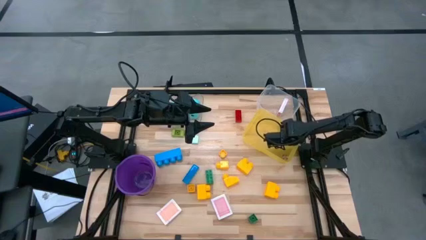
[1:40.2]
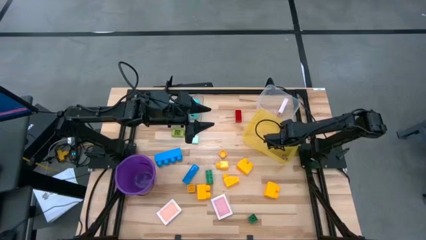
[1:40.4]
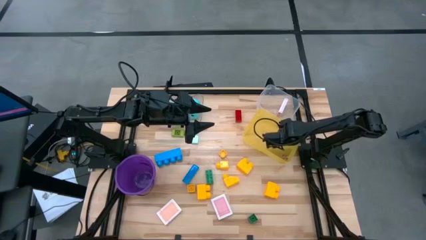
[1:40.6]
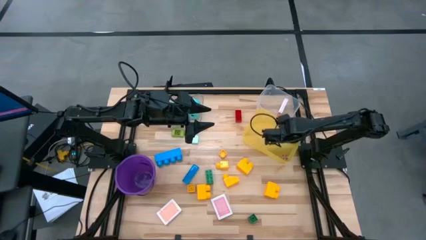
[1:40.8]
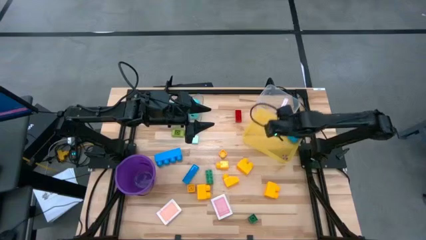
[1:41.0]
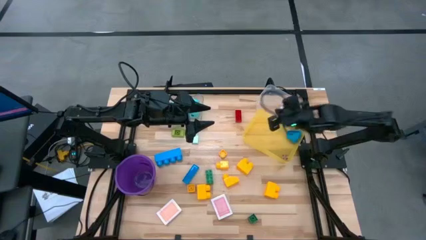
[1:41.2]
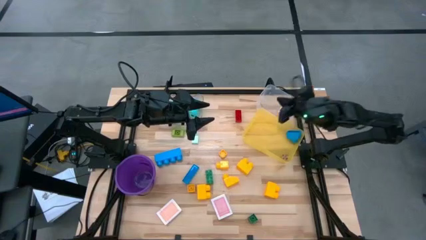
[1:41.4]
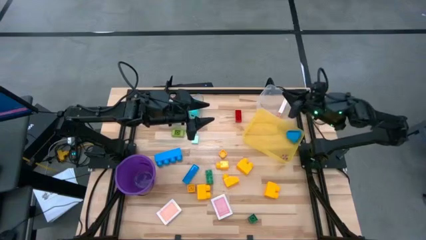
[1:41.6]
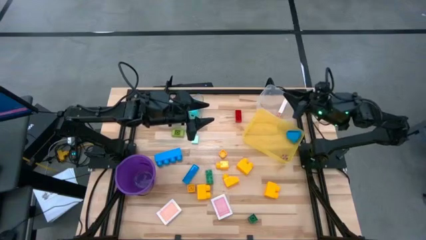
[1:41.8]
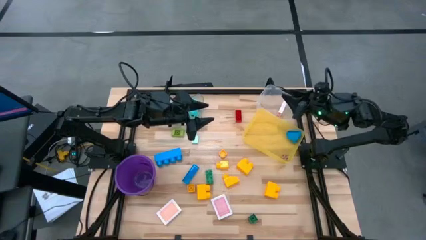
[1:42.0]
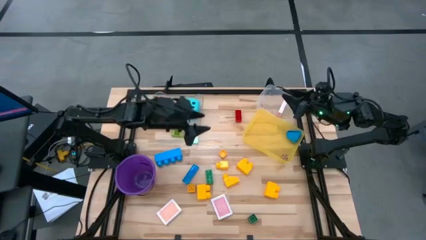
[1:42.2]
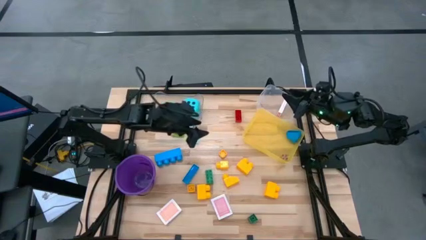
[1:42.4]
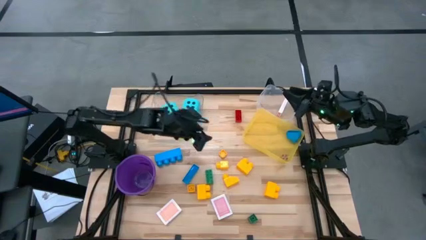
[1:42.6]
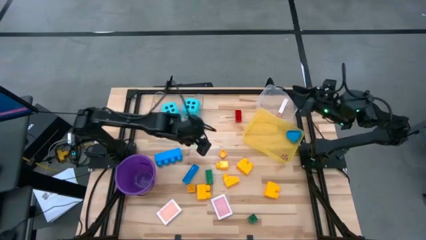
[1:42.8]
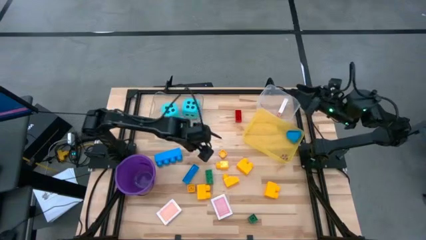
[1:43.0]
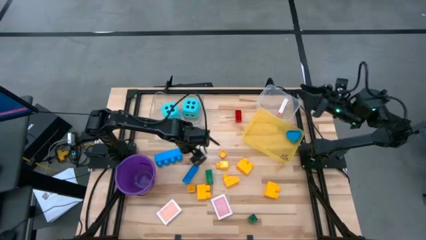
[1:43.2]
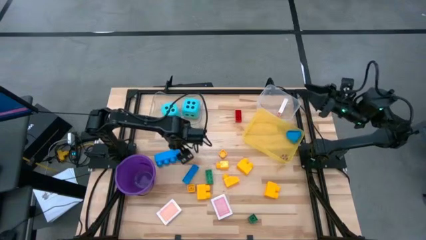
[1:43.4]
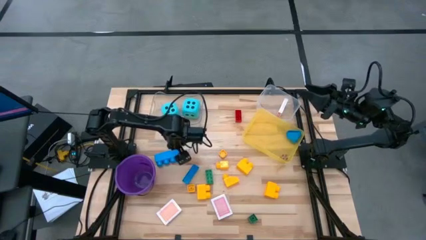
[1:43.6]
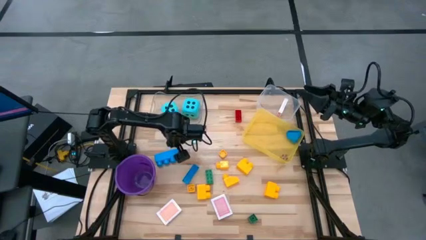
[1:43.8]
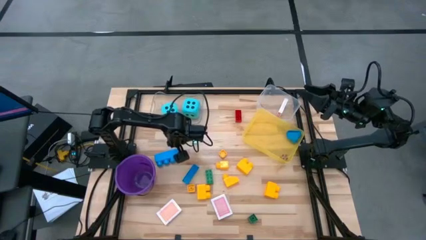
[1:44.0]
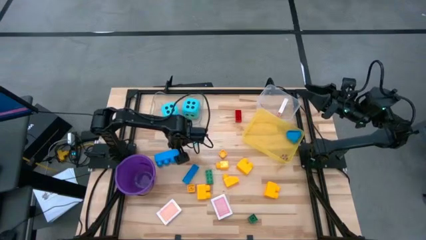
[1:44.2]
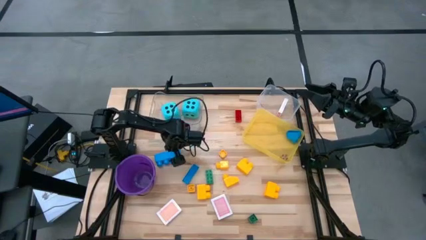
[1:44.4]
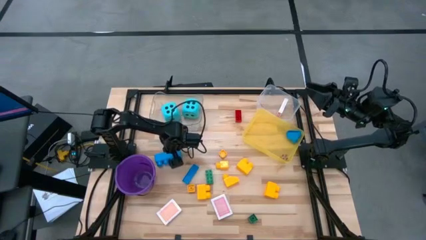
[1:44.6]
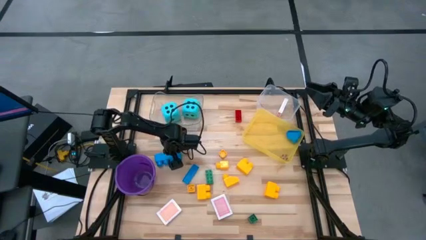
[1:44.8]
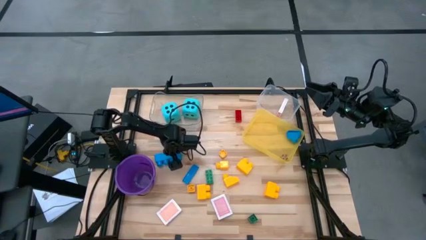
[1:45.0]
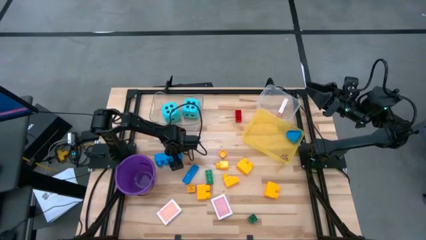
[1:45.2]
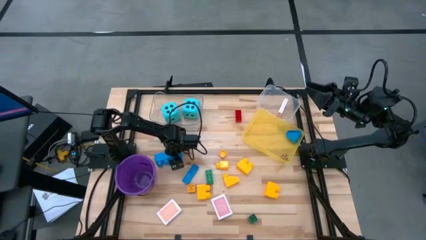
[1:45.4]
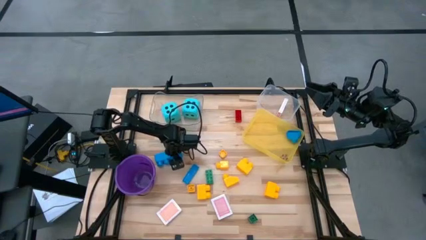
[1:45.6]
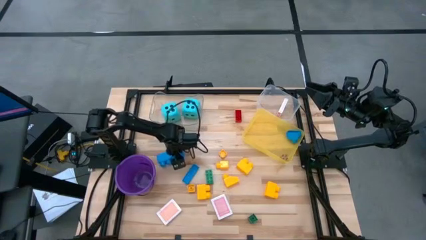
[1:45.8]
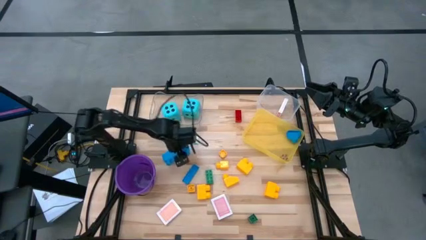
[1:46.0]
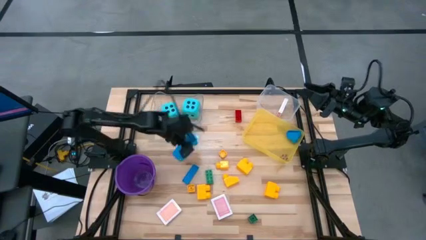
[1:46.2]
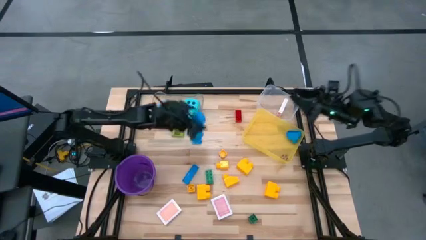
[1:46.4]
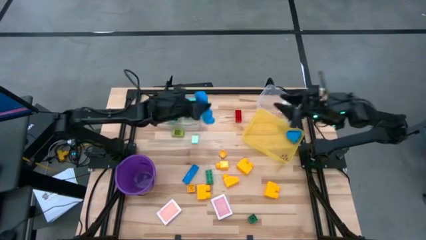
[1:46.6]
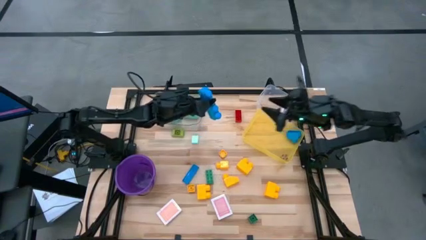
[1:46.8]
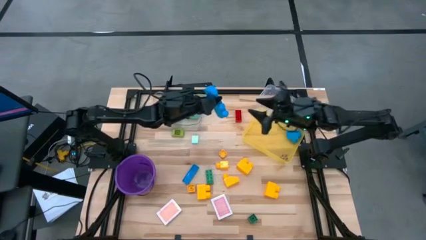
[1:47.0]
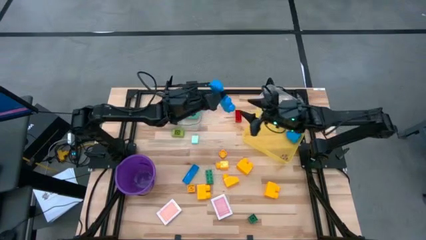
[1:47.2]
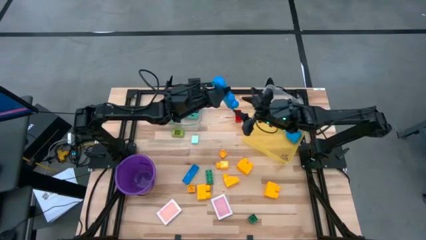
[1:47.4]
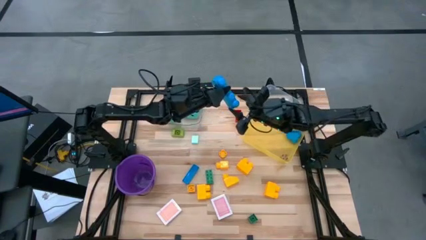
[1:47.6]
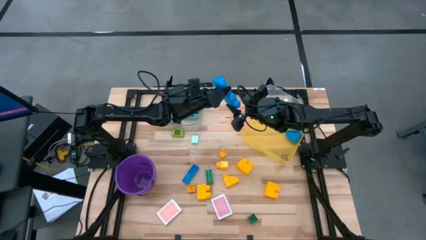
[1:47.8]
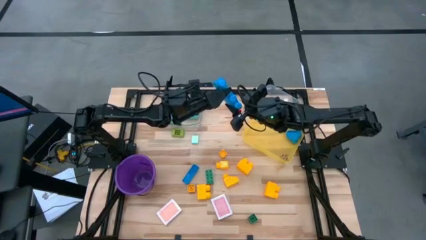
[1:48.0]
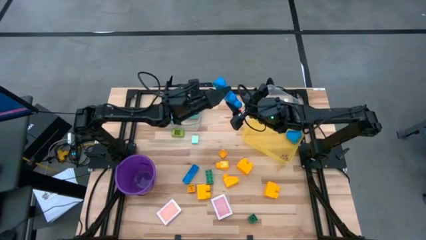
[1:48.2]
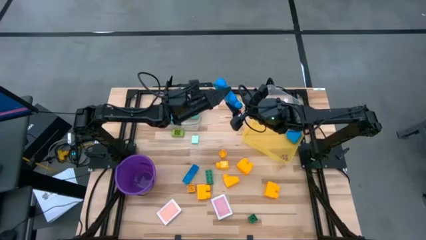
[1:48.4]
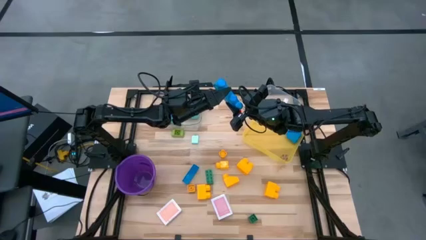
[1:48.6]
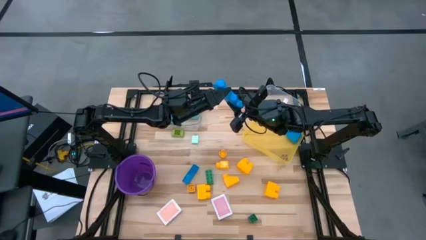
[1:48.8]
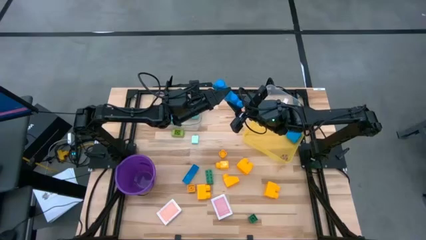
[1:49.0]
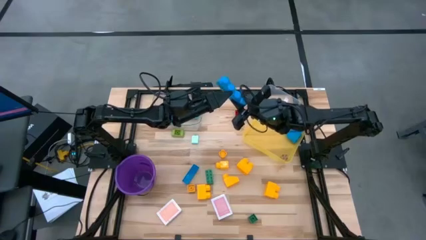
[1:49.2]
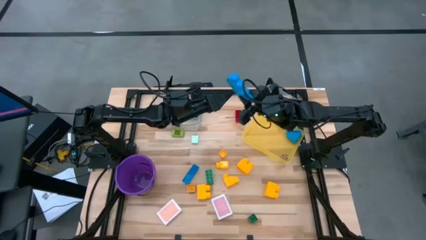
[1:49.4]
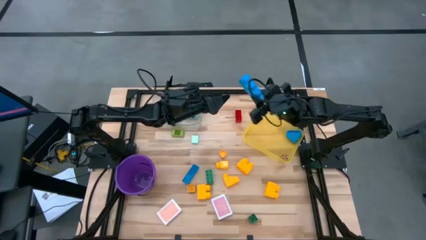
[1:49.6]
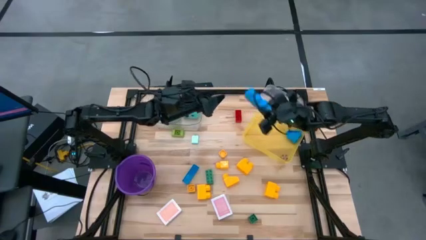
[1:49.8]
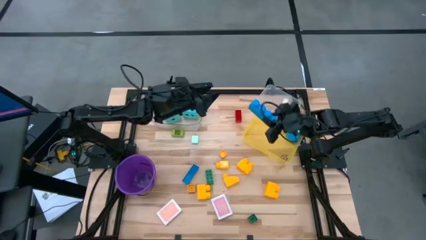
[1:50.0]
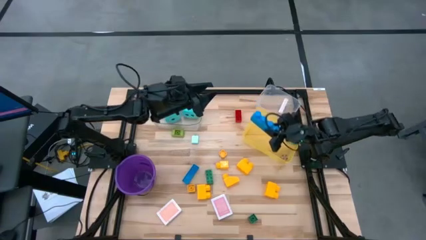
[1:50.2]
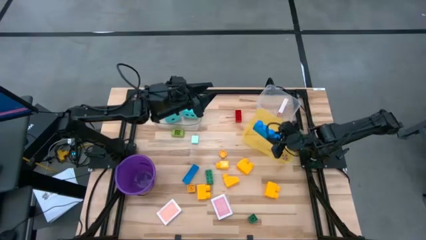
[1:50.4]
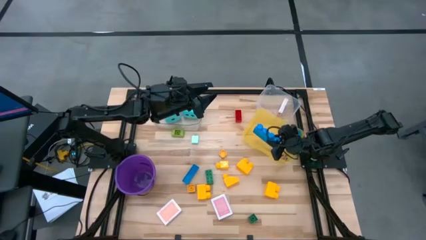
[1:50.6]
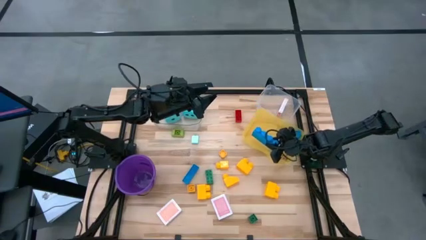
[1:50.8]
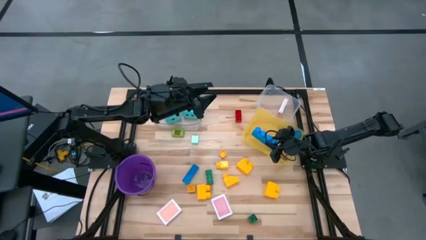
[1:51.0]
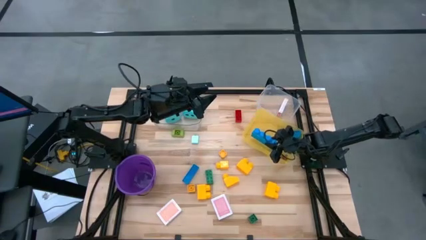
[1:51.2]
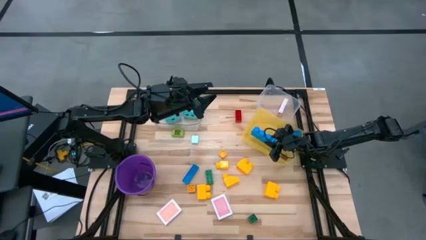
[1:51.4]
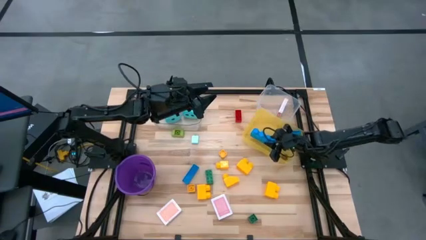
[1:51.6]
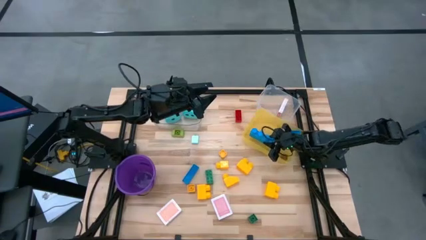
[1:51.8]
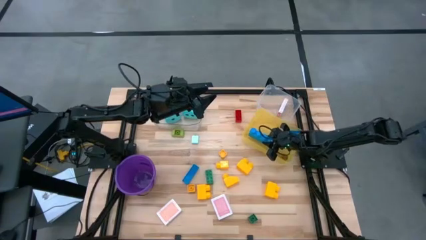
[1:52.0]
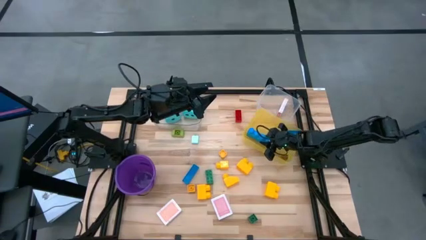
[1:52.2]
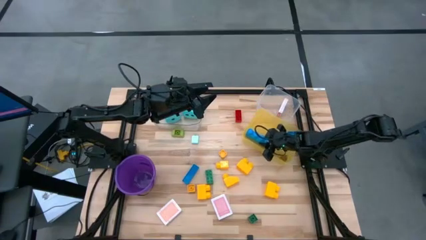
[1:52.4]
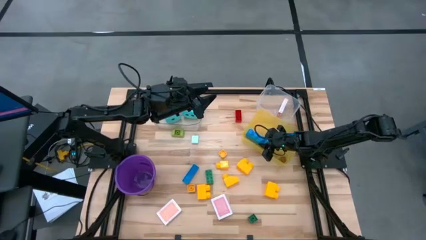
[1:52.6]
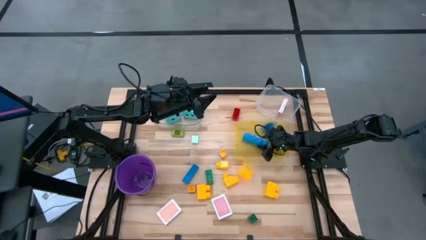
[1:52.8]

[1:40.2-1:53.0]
Task: Pick & Place Toys
Put the blue game piece into the yellow bin

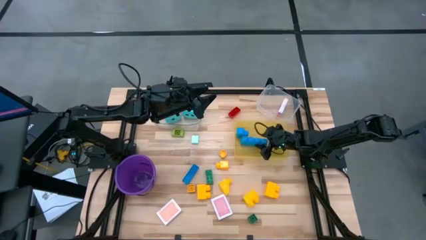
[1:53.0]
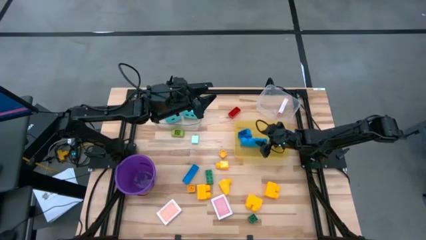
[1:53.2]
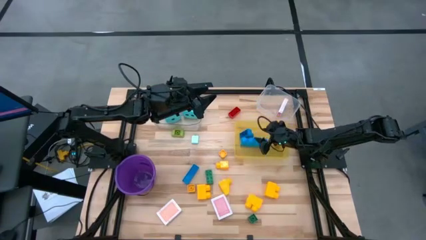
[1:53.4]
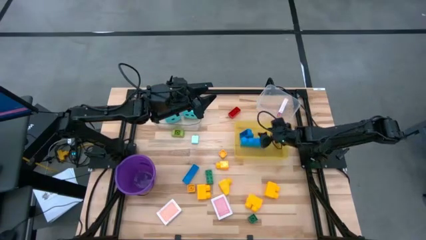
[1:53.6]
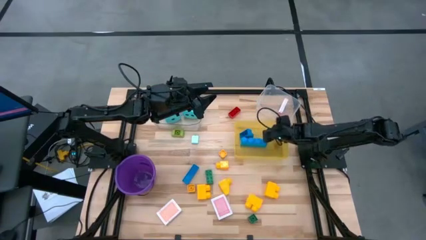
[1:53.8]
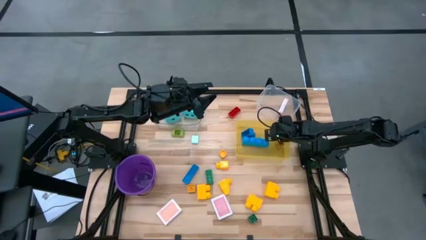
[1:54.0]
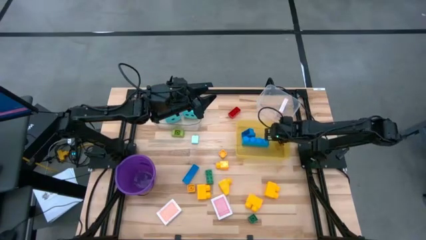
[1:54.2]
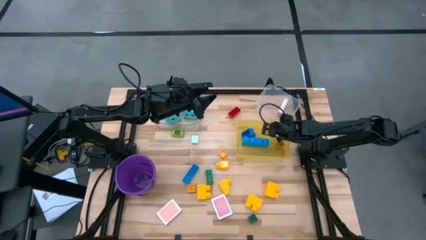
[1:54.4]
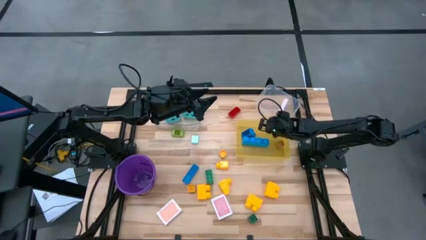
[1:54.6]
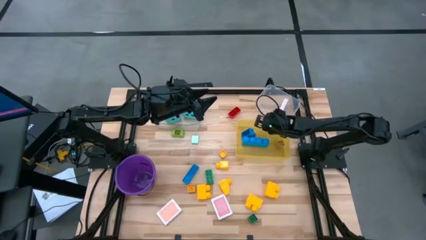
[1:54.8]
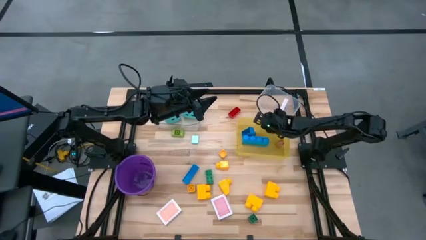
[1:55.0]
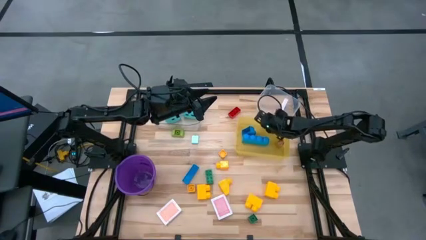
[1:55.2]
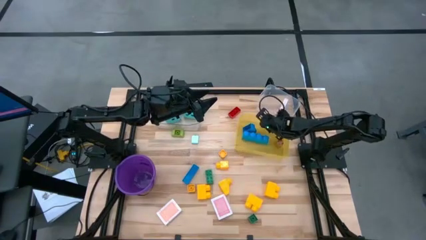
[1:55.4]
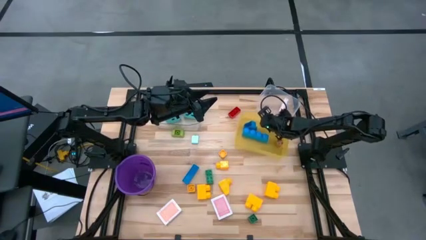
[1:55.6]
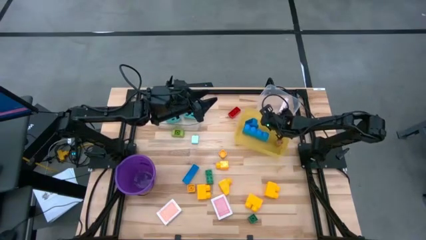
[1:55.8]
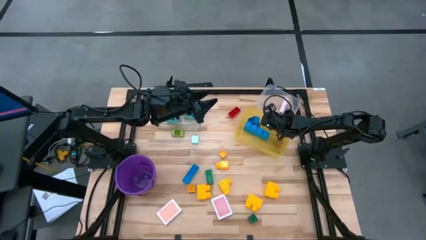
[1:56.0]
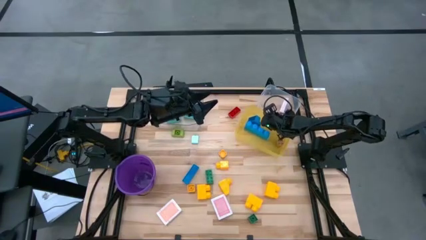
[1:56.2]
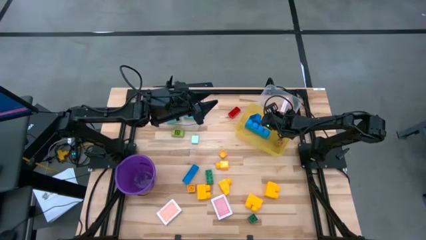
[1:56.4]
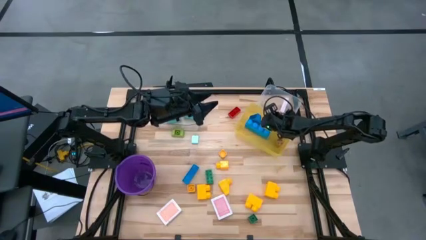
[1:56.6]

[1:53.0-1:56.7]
Adjust the yellow bin
